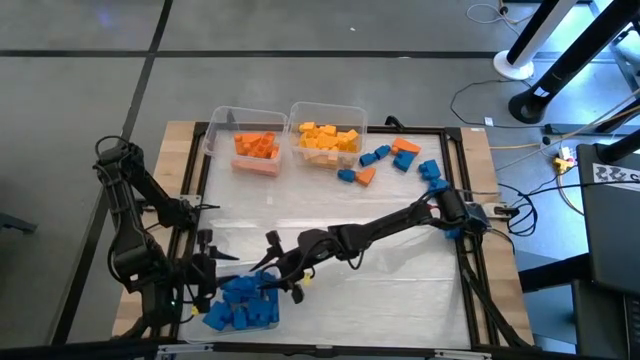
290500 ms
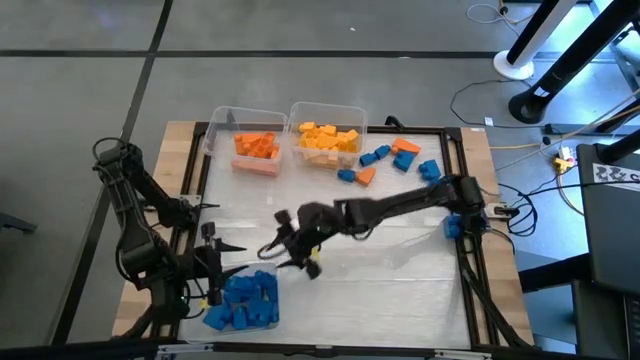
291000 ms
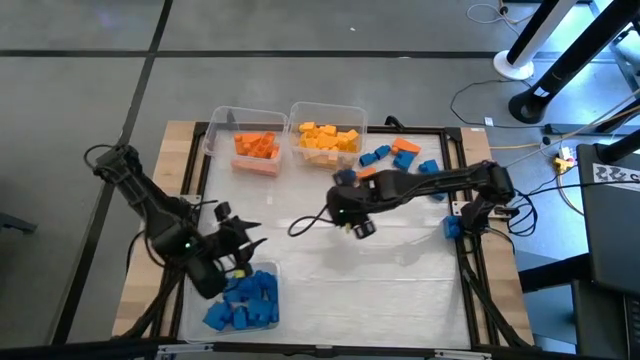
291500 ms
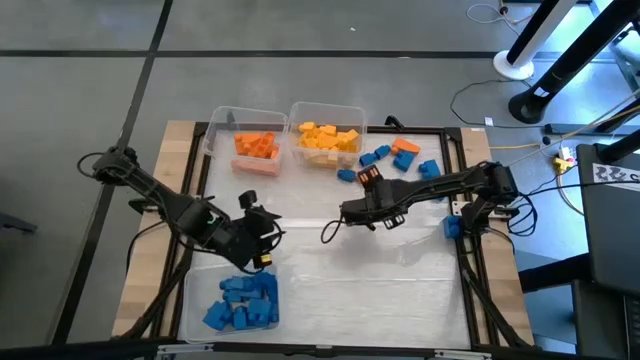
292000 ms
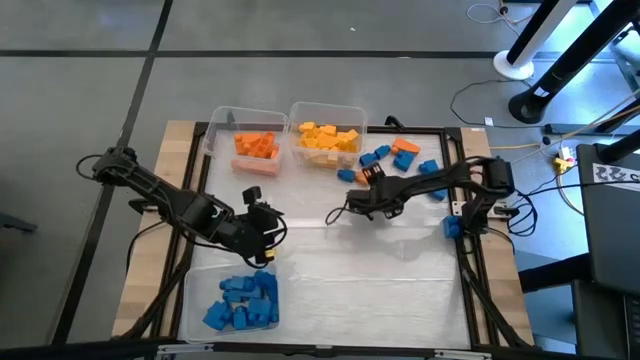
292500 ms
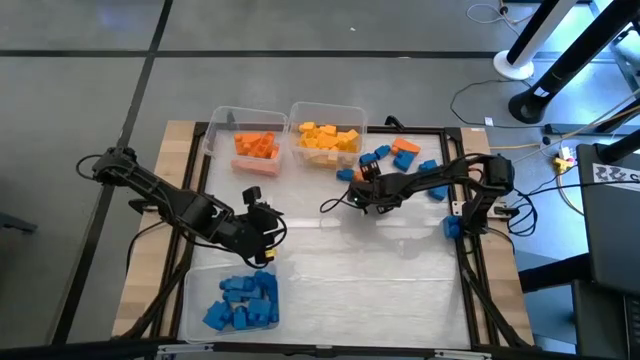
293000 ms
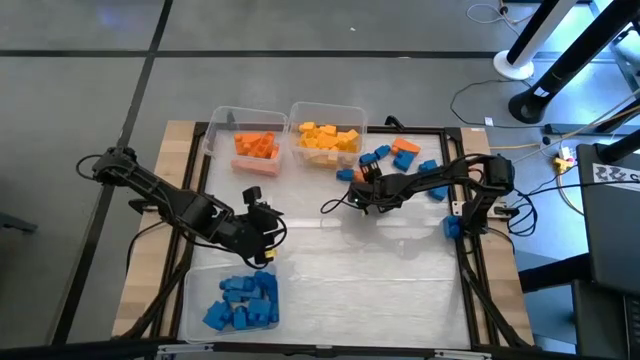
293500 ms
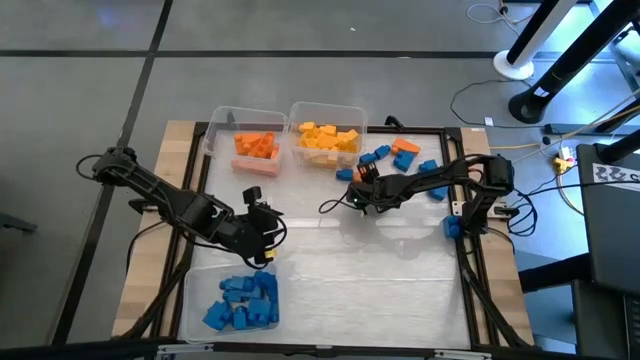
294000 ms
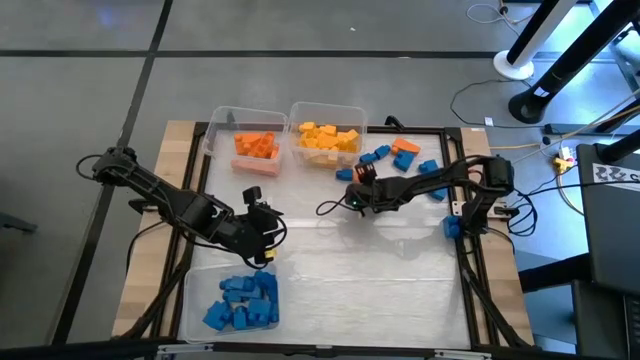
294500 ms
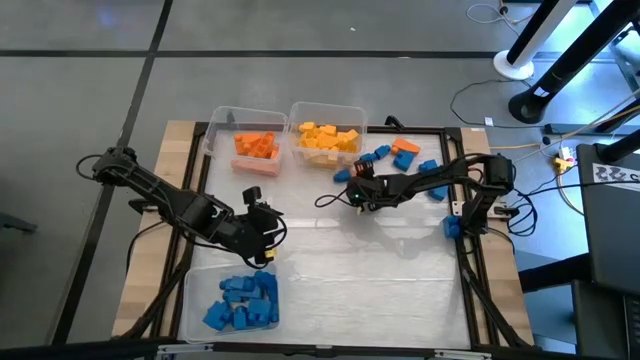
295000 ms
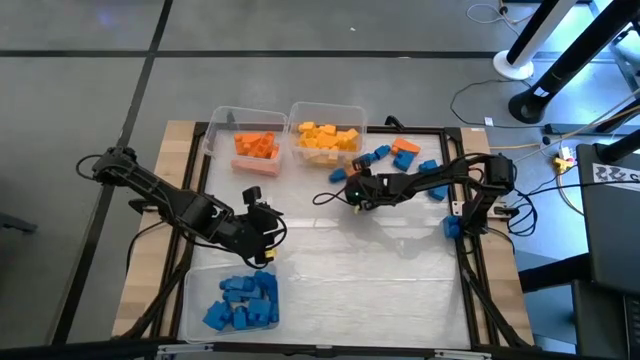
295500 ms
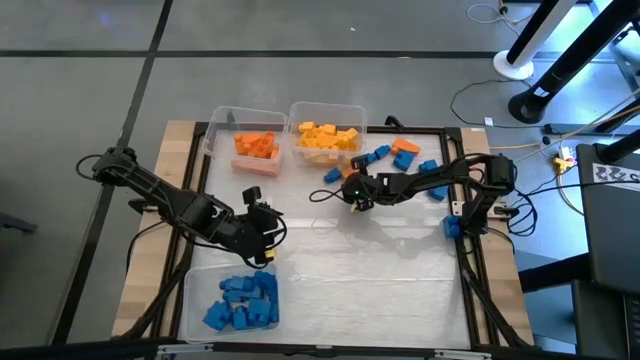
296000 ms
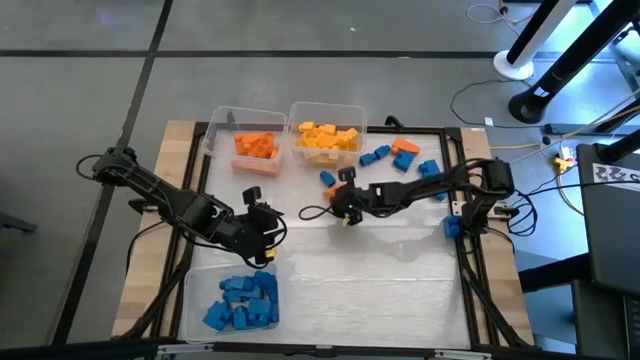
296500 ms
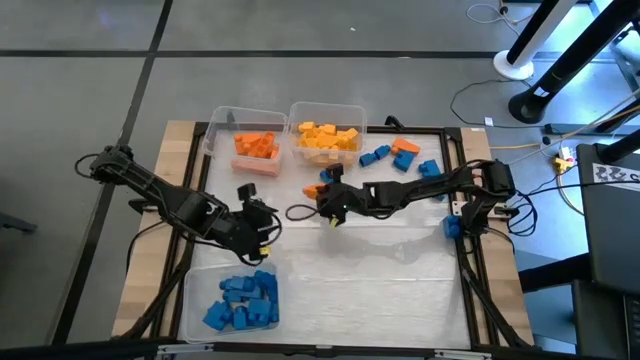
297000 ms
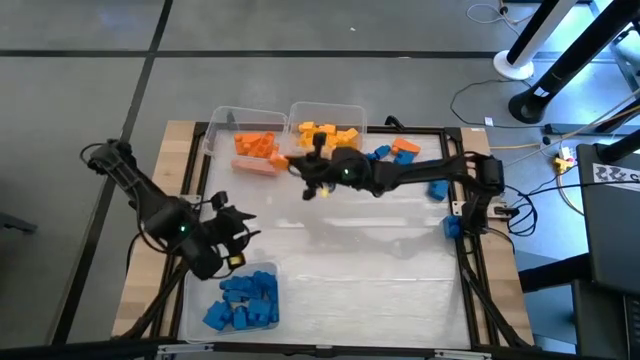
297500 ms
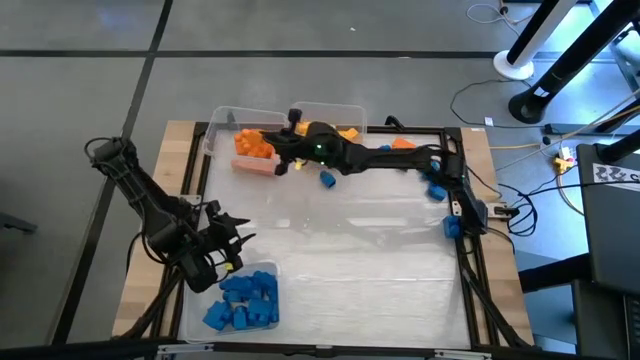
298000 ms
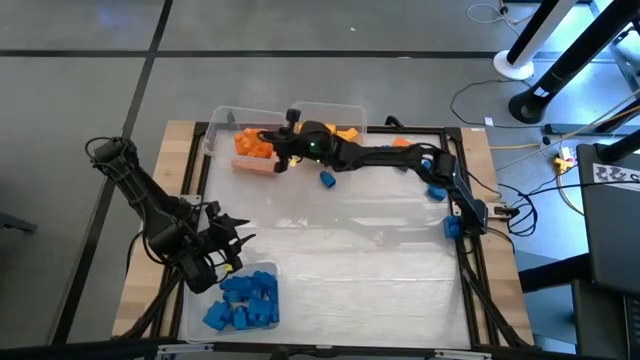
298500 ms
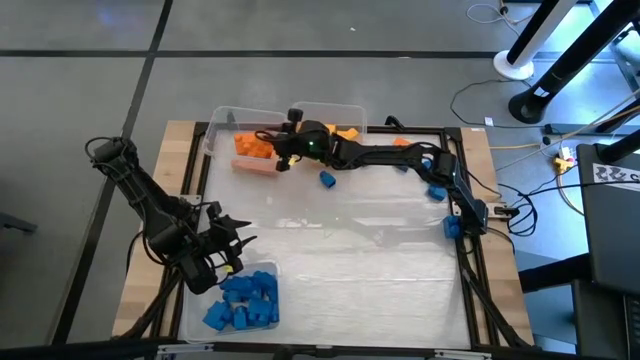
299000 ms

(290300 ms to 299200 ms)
Task: Sort blocks
Put the orange game piece into the top left transparent bin

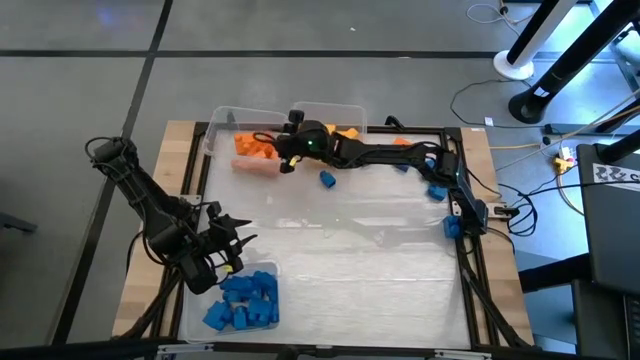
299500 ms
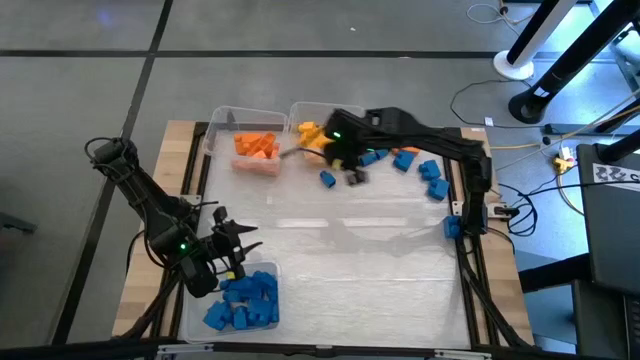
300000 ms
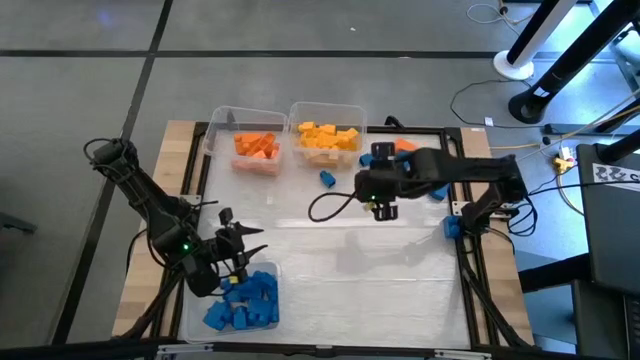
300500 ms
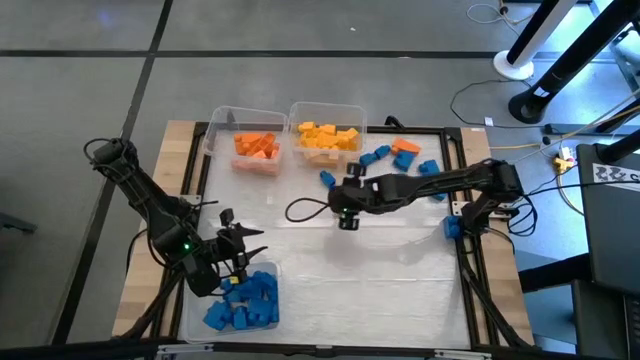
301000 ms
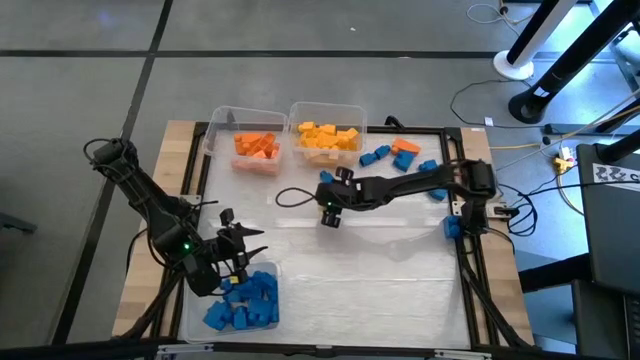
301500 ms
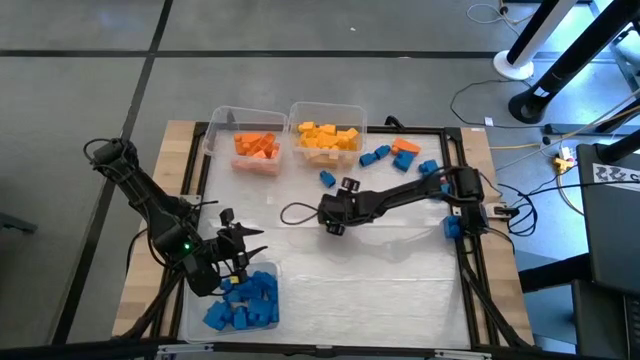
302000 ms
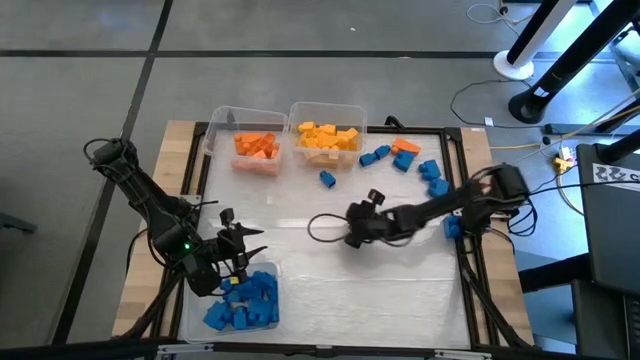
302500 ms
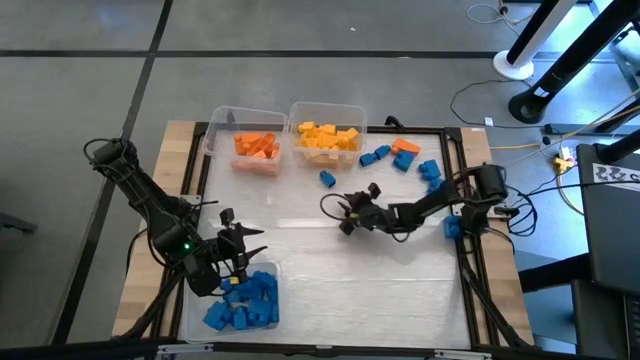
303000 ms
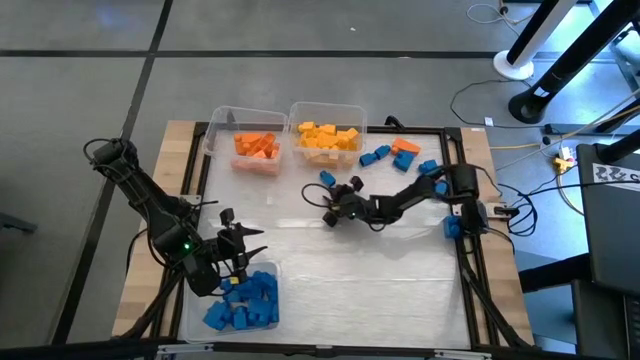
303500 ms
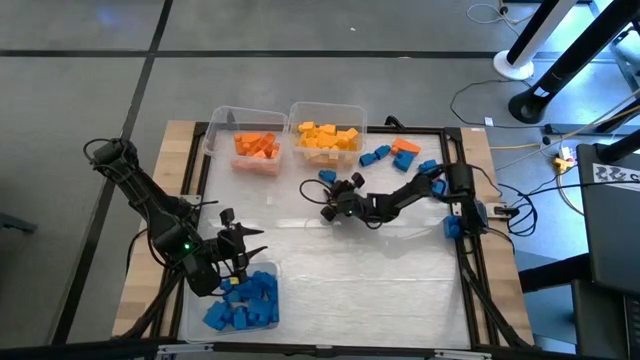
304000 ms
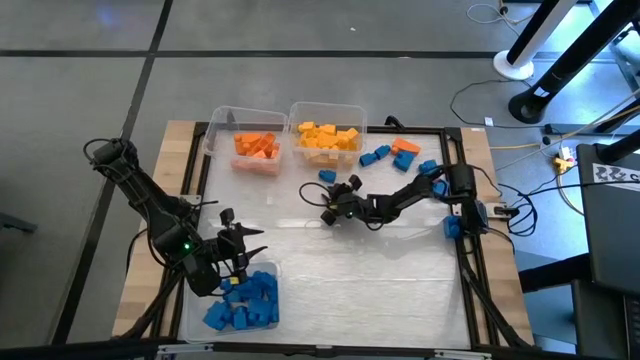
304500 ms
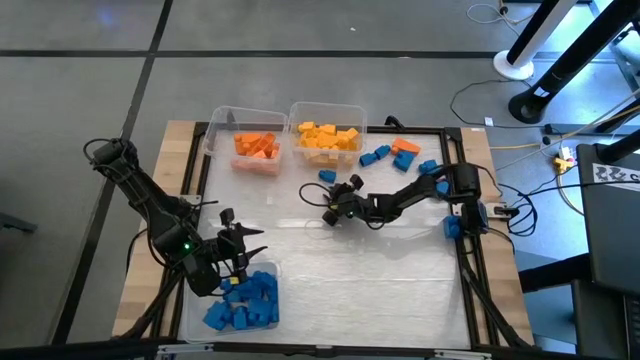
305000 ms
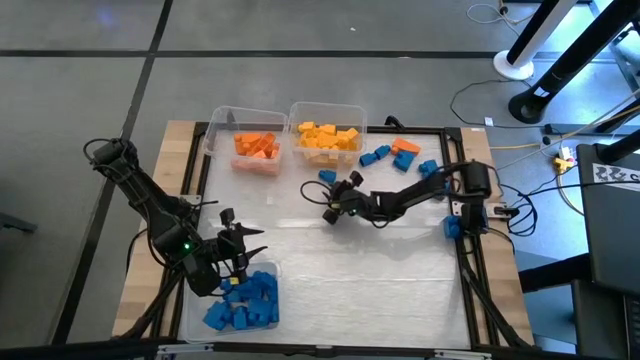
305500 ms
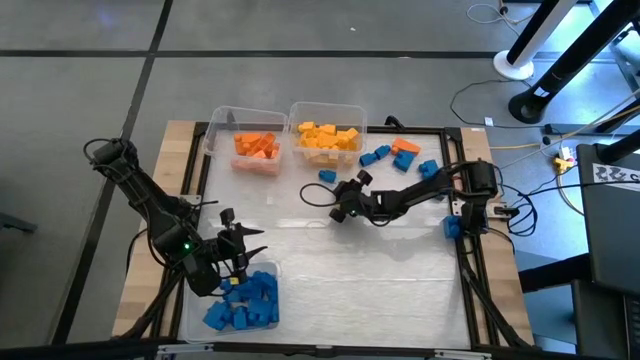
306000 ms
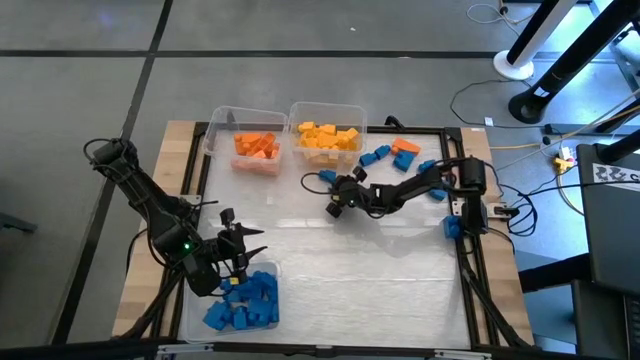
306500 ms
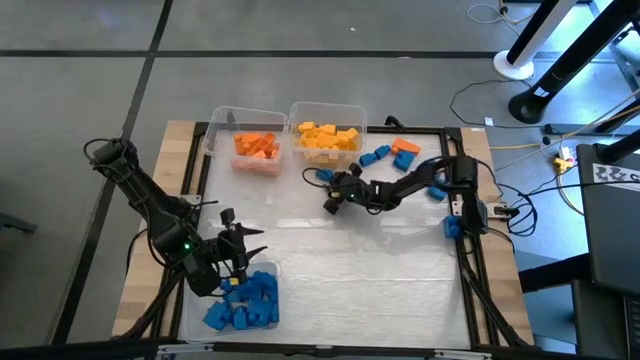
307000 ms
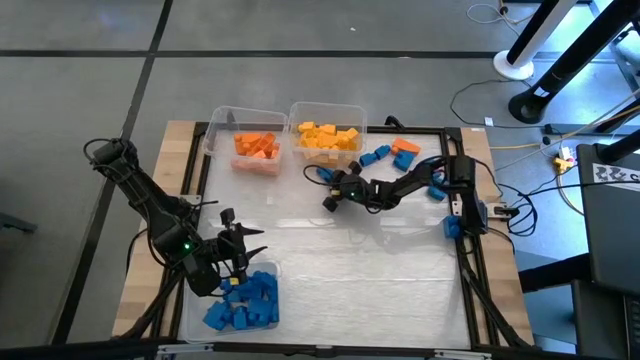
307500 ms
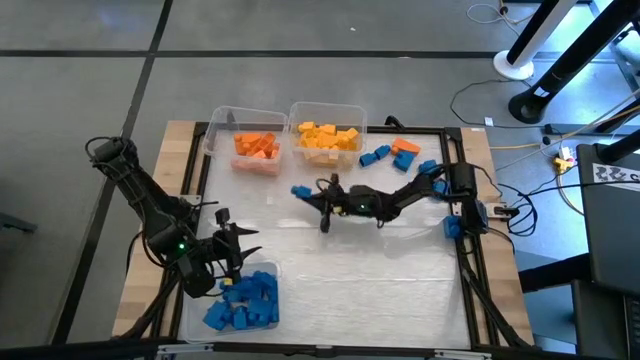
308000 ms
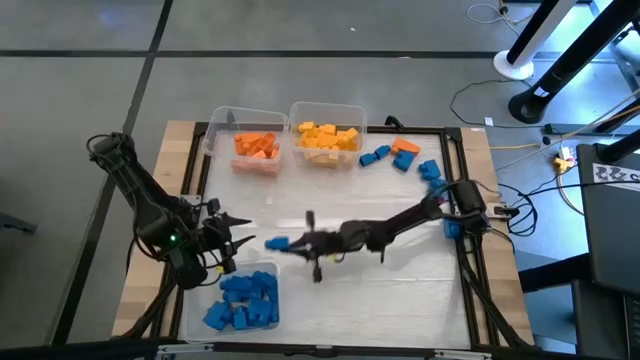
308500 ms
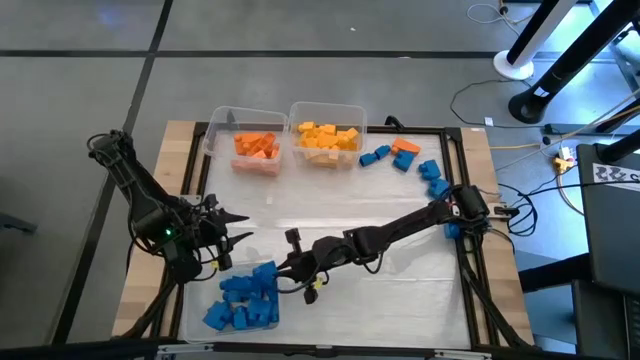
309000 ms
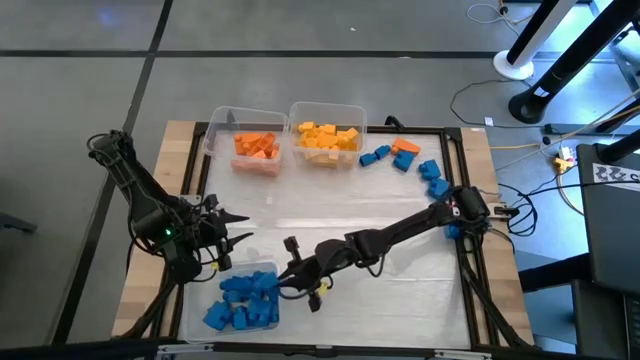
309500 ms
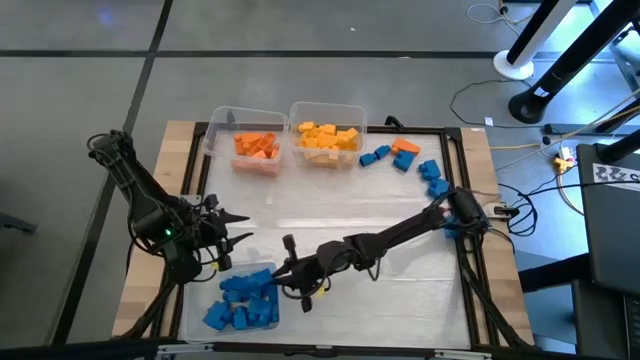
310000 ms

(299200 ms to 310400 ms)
Put the blue game piece into the bottom transparent bin

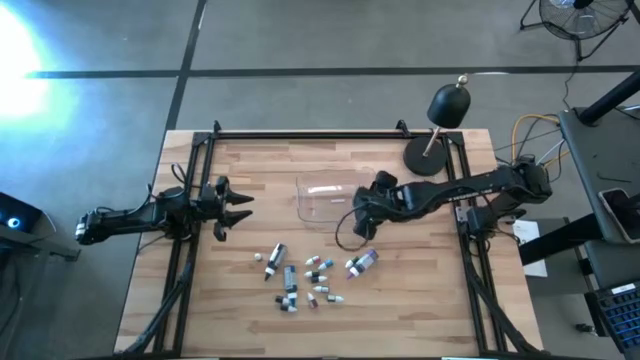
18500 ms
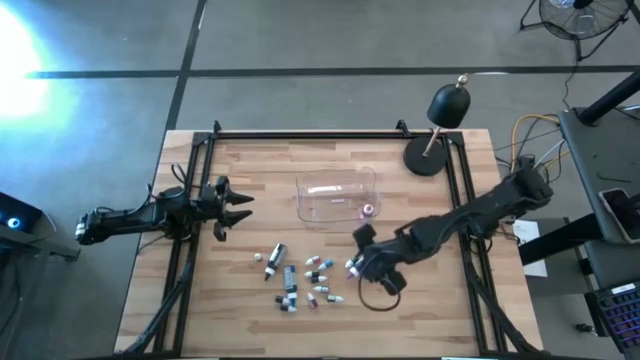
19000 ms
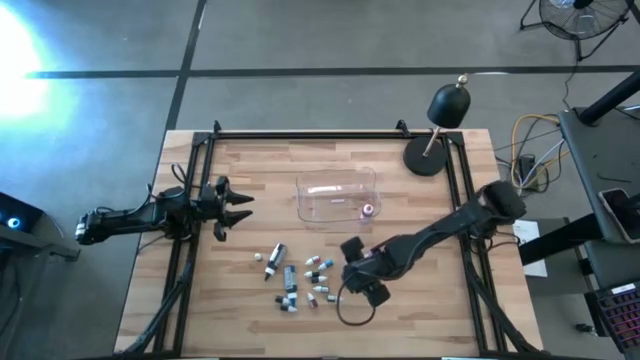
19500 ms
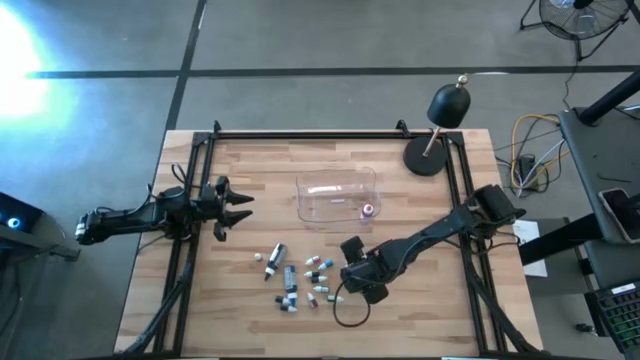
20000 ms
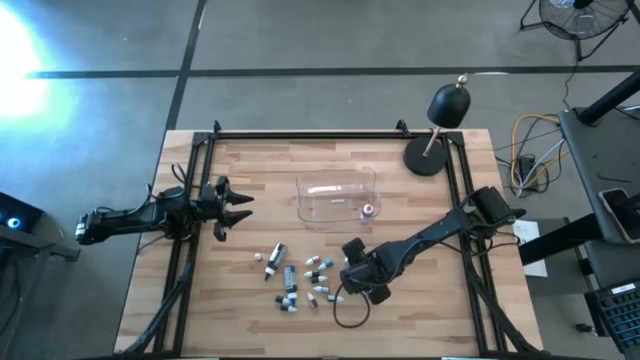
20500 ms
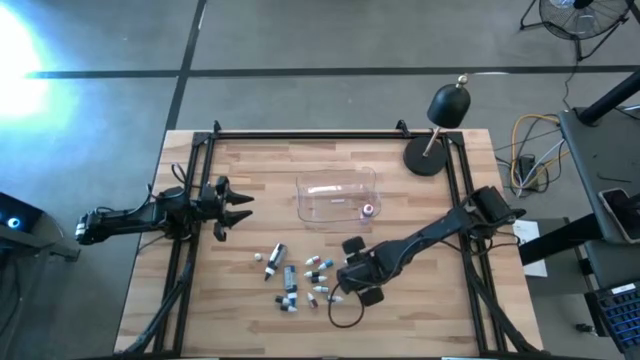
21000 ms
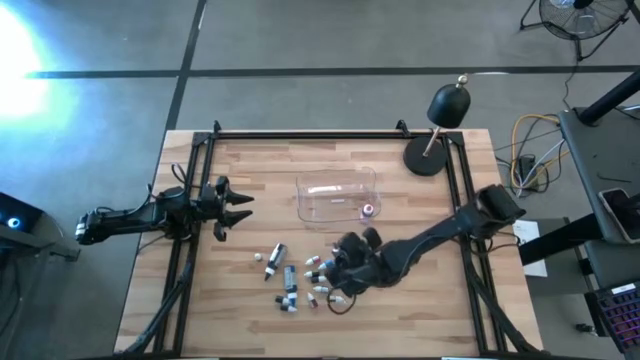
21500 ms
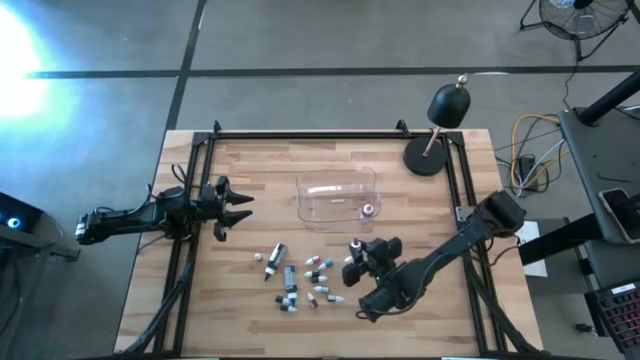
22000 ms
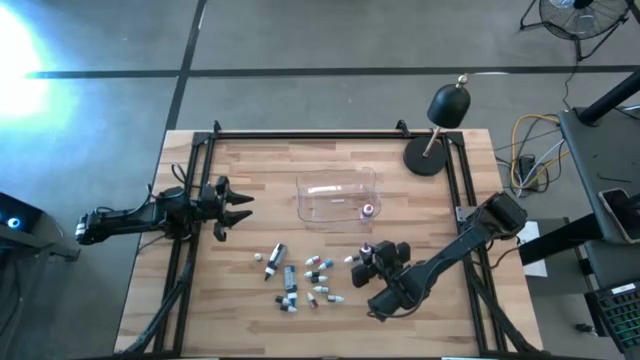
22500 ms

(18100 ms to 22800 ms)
Task: Pick & Place food coloring
Put the large violet food coloring bottle into the transparent bin
